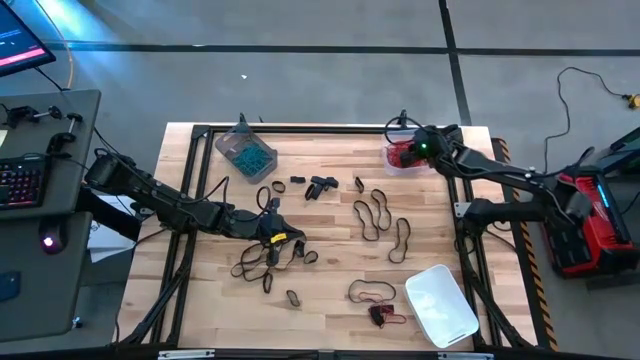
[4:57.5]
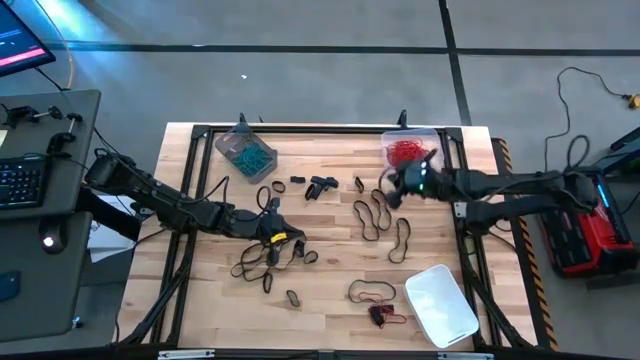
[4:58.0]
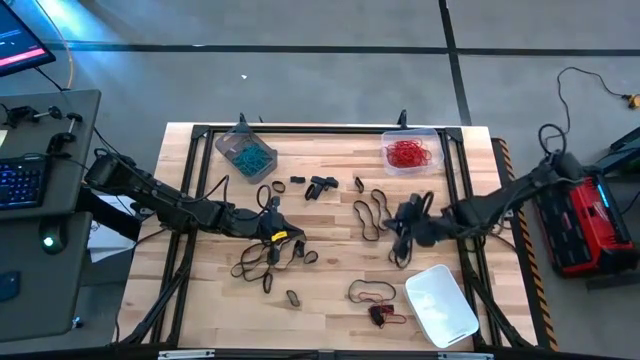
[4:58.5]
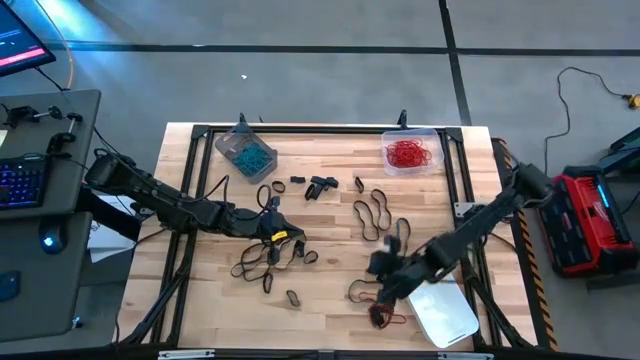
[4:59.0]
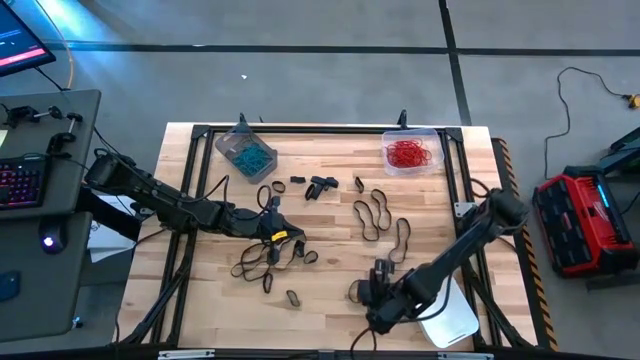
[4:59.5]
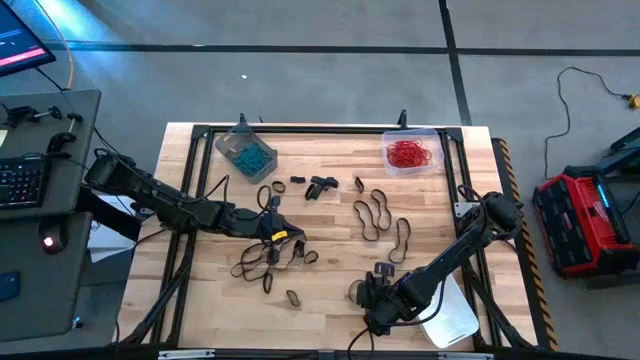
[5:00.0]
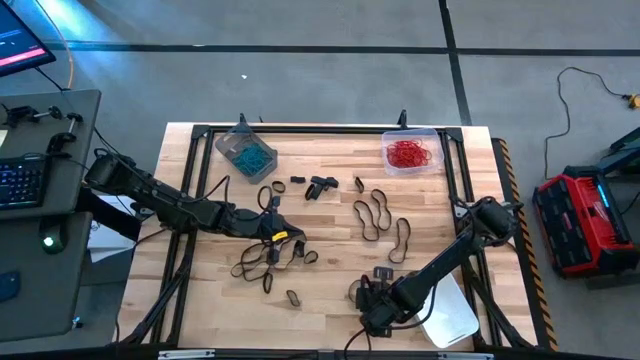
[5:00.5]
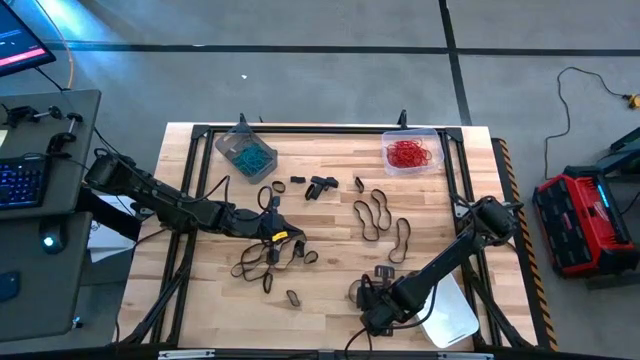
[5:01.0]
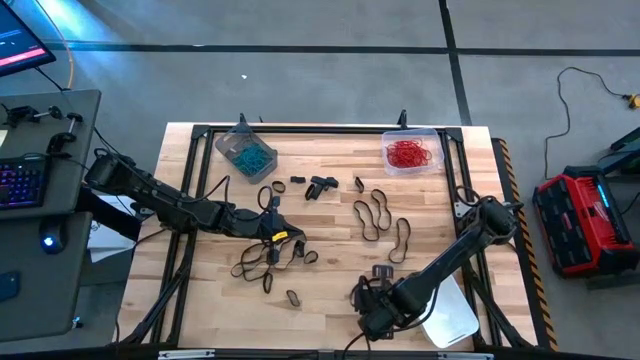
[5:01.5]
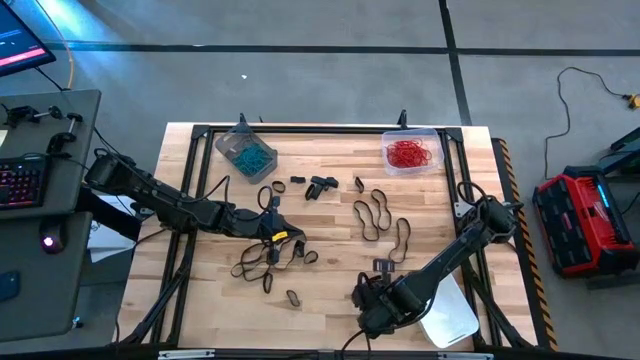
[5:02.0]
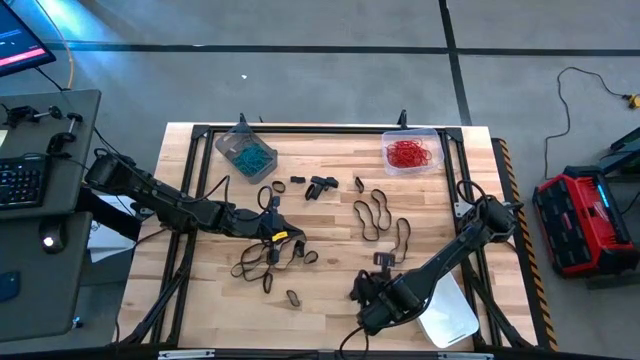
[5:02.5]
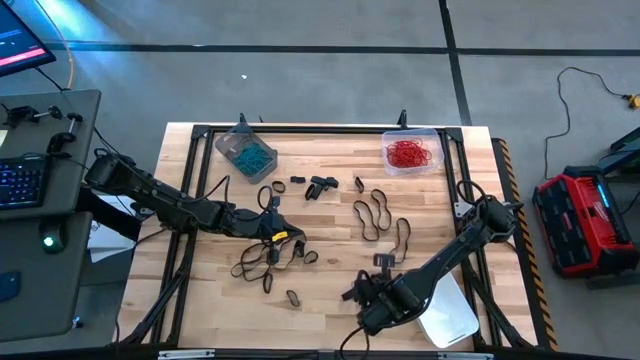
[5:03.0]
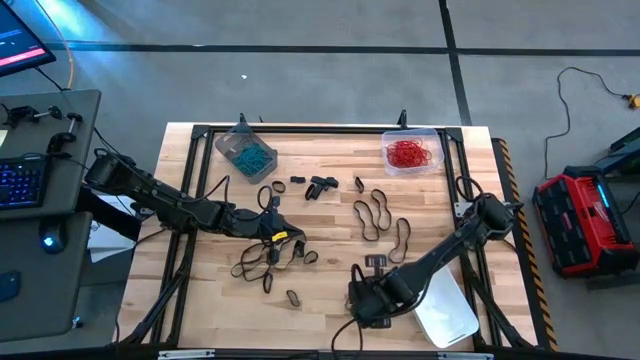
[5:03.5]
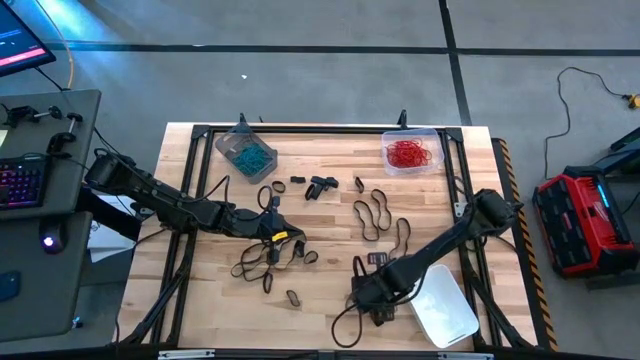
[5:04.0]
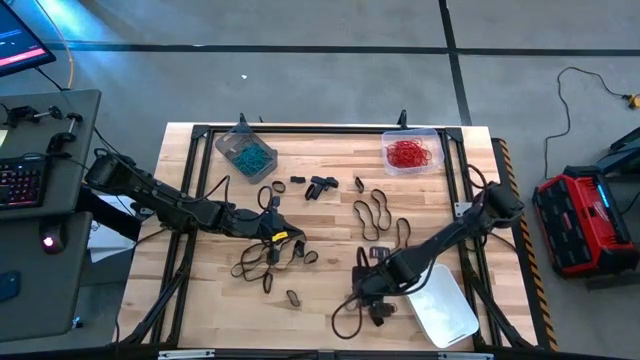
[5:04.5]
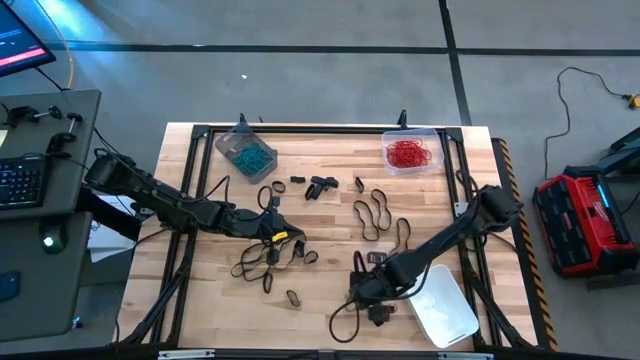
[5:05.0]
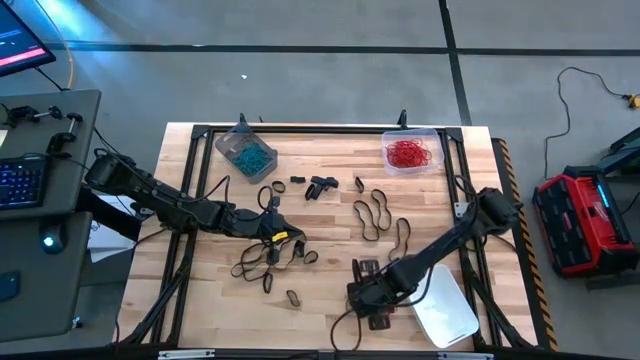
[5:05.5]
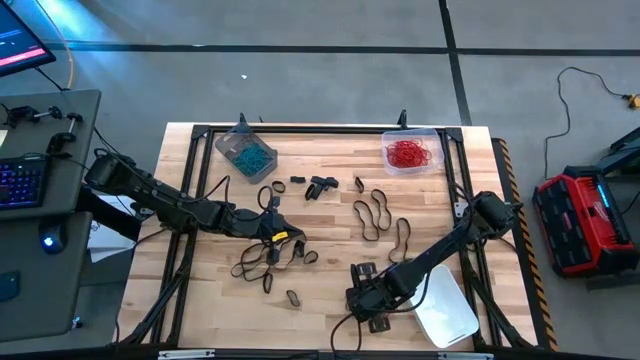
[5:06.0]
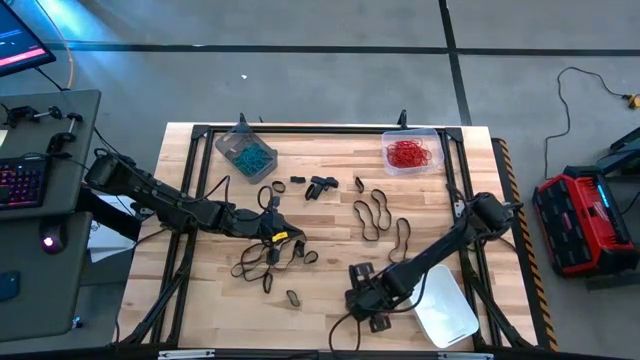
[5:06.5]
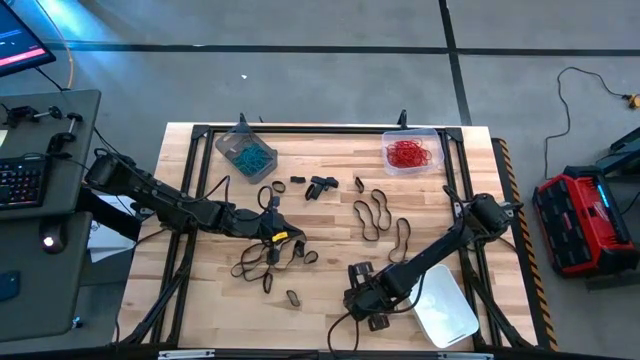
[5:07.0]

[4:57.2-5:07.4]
Task: Sort rubber bands into baskets
Put the red rubber band into the transparent bin

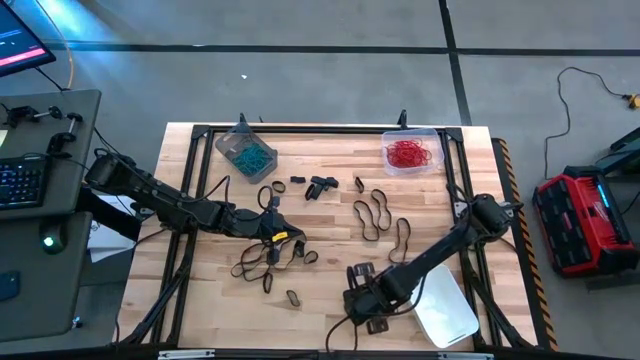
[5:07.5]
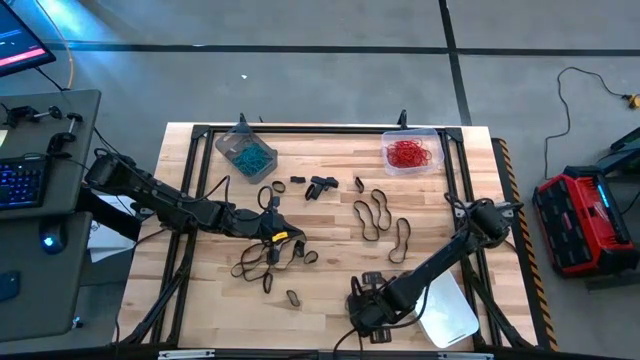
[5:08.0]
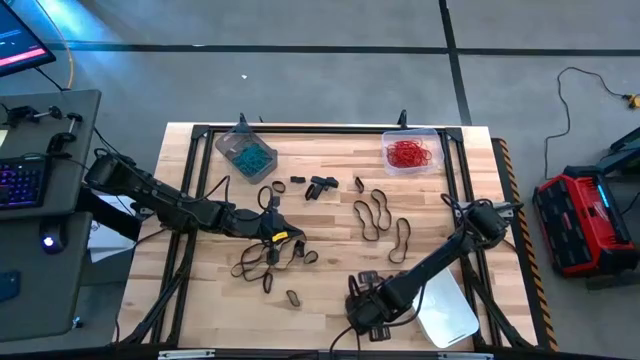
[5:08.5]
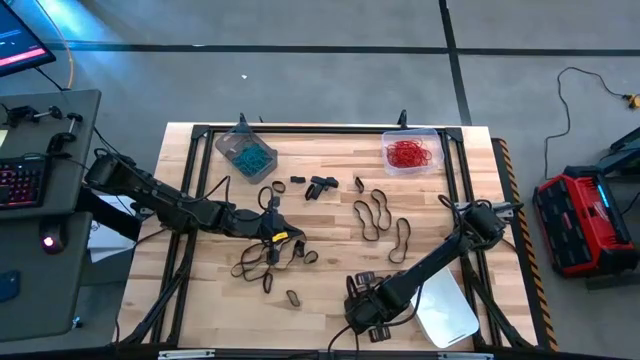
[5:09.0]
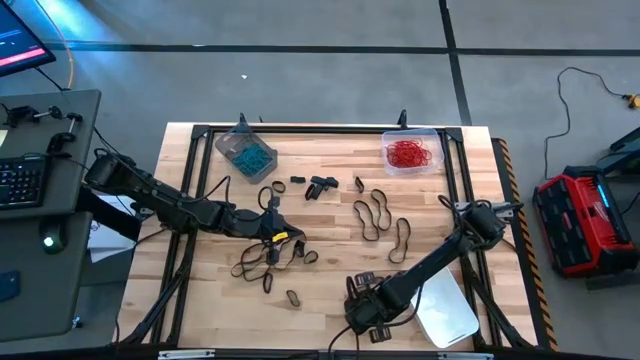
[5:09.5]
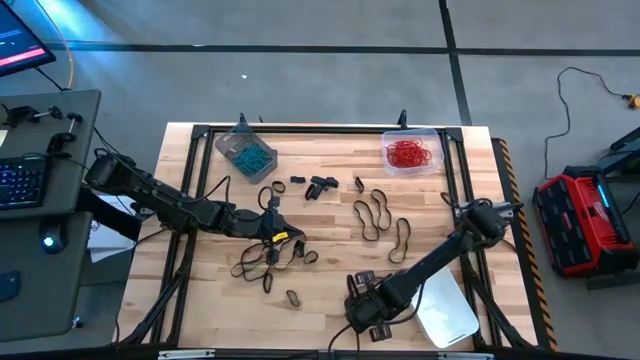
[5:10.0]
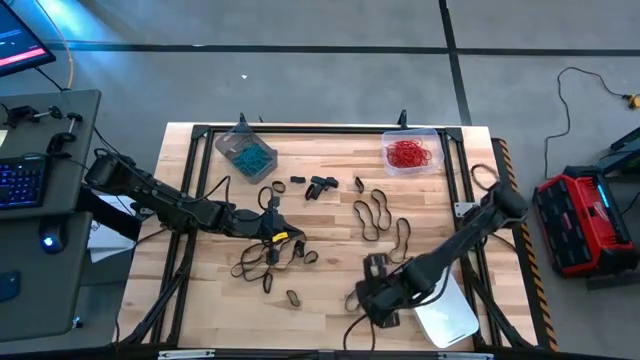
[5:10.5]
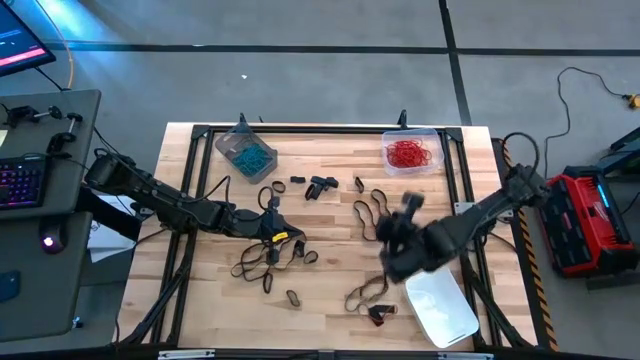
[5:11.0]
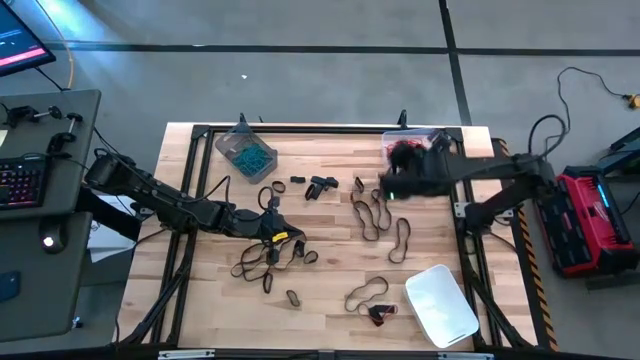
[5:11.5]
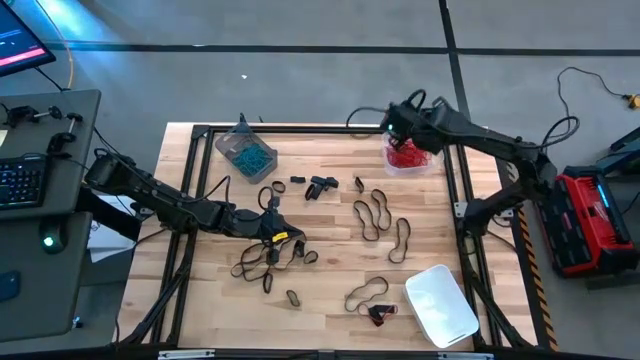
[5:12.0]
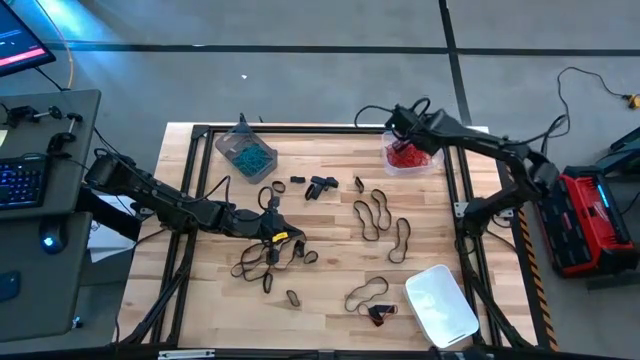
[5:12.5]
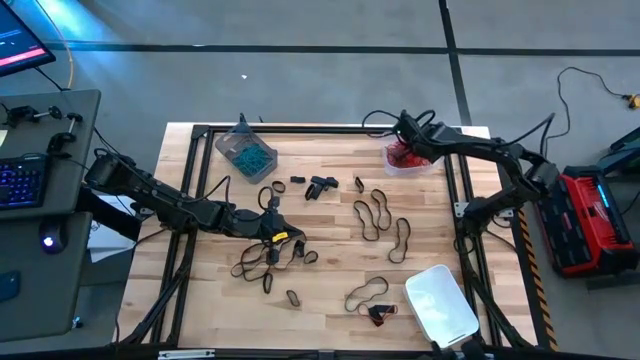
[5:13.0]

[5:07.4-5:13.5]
Put the red rubber band into the transparent bin

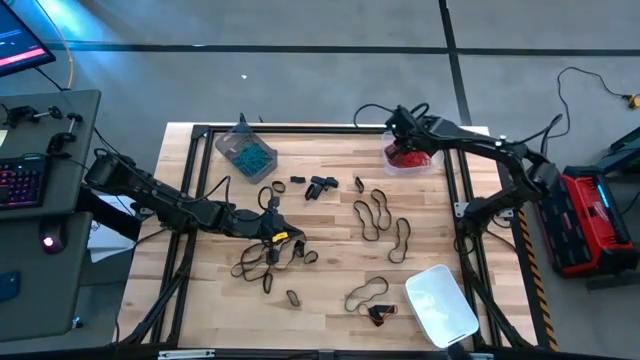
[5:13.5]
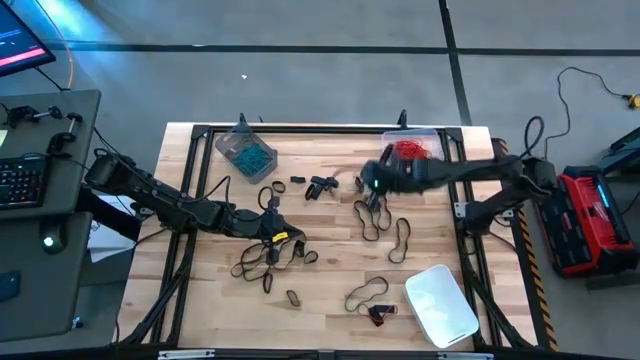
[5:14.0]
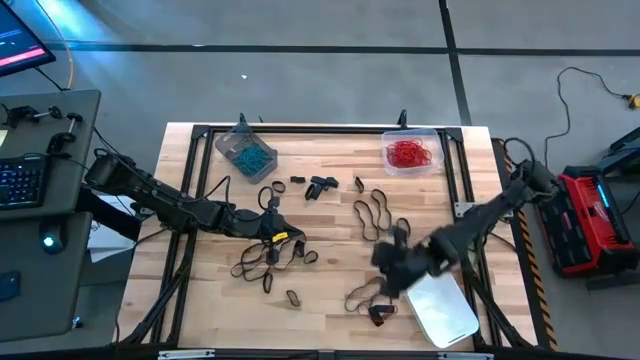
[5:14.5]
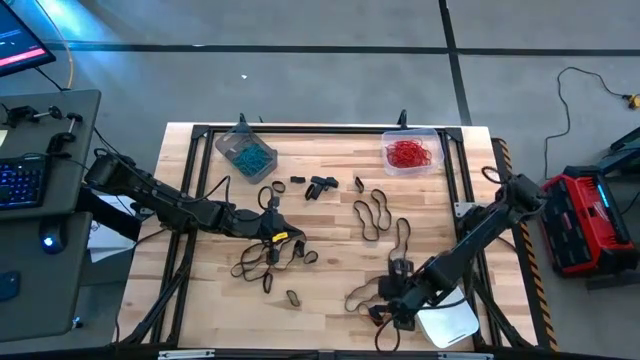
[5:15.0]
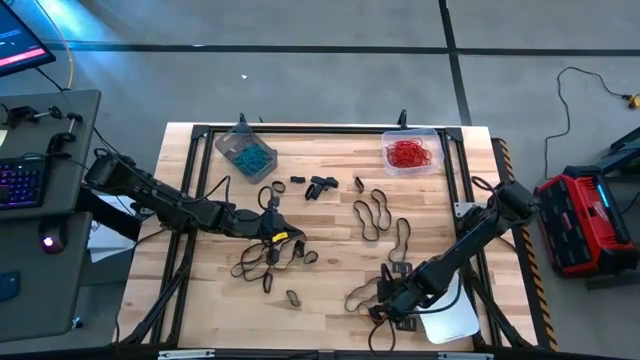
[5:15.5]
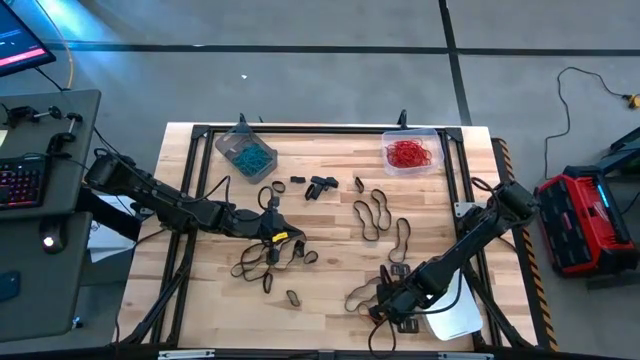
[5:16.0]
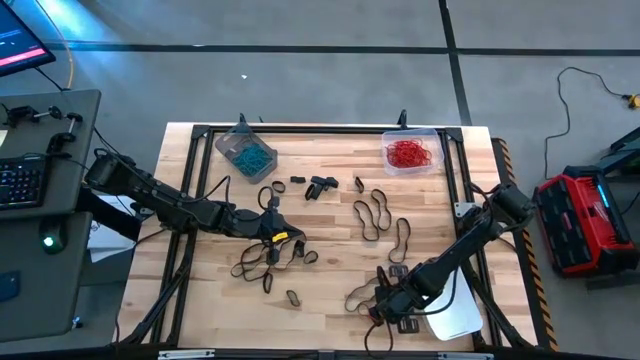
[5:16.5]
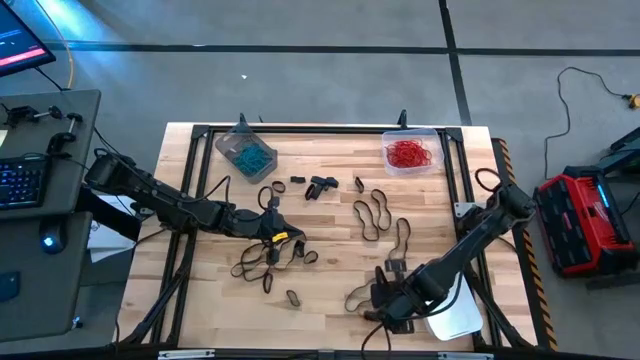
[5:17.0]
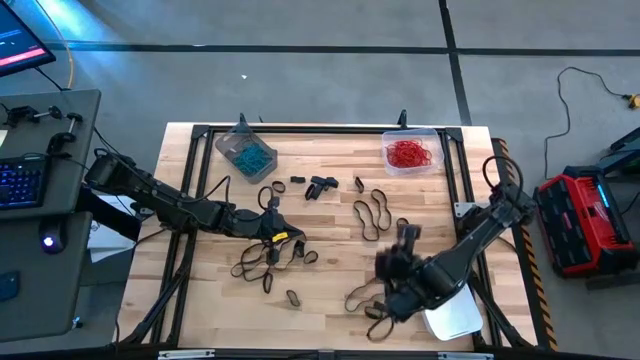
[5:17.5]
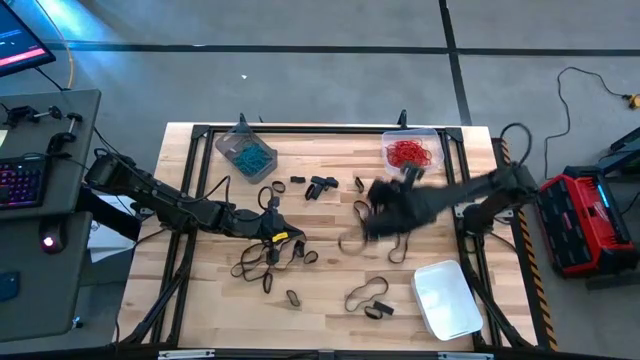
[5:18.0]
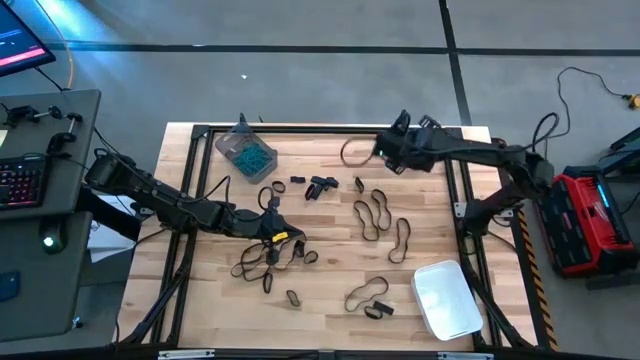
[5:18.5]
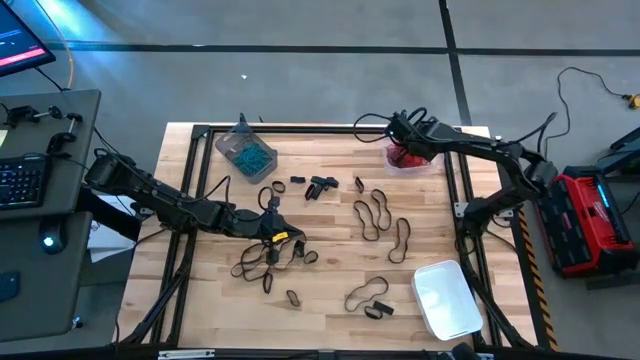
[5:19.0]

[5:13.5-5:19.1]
Put the red rubber band into the transparent bin

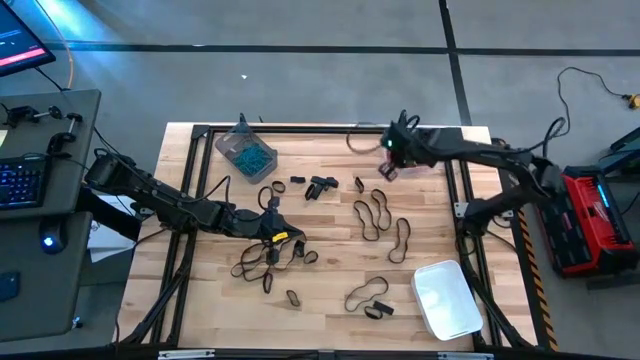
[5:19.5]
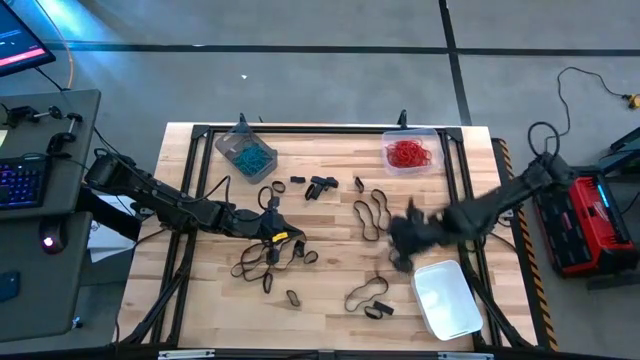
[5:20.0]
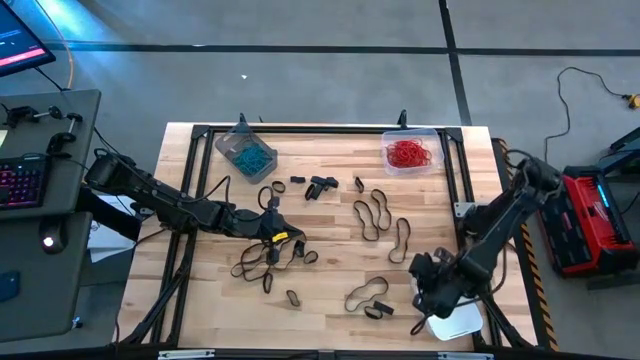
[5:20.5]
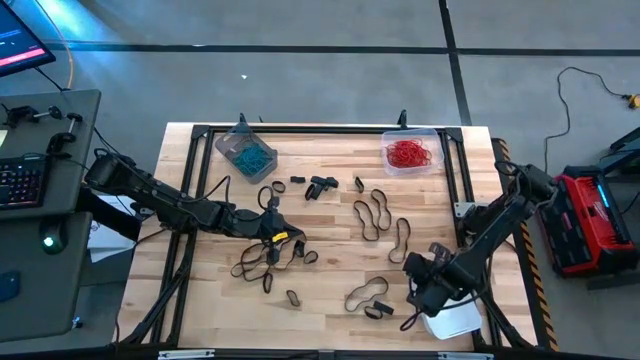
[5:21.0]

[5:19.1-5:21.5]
Adjust the white bin on the table
